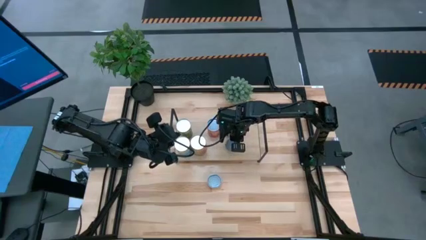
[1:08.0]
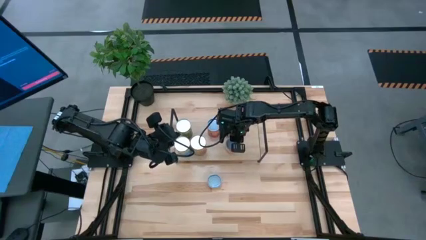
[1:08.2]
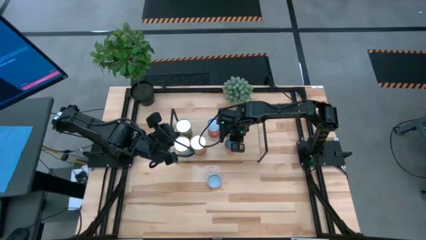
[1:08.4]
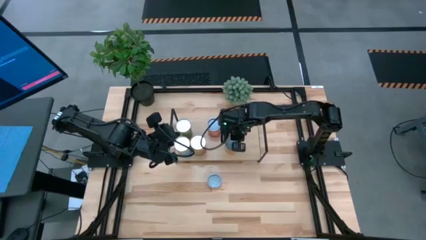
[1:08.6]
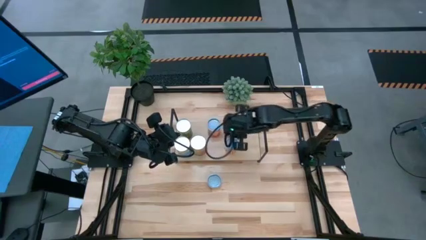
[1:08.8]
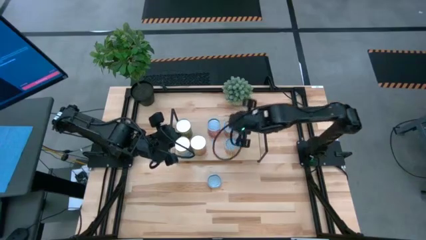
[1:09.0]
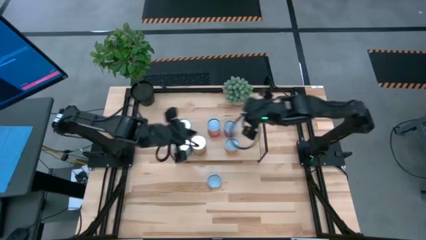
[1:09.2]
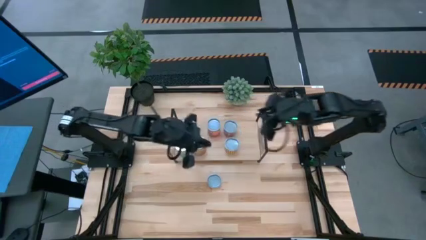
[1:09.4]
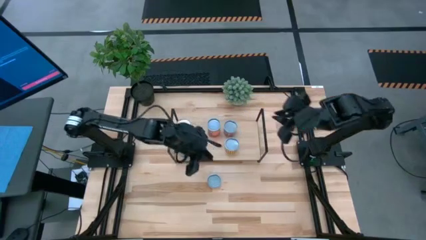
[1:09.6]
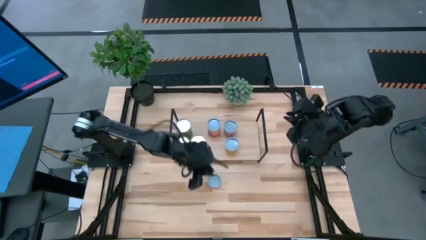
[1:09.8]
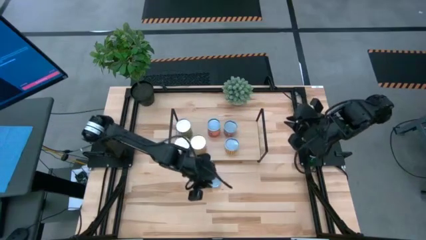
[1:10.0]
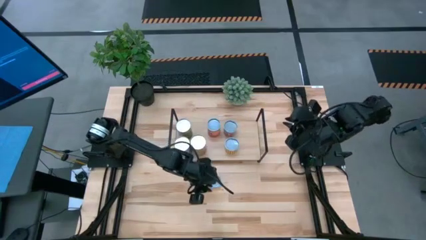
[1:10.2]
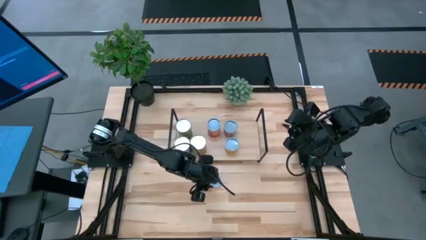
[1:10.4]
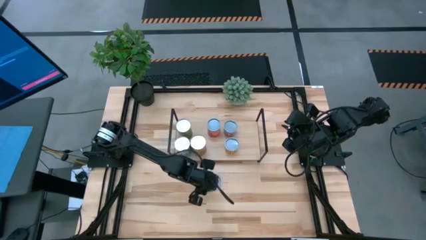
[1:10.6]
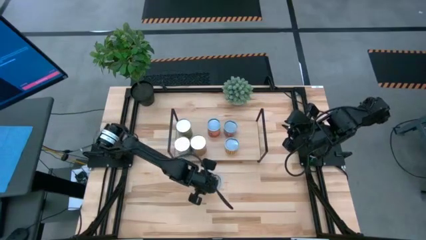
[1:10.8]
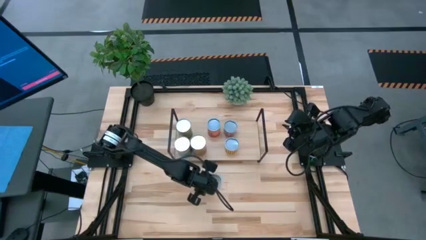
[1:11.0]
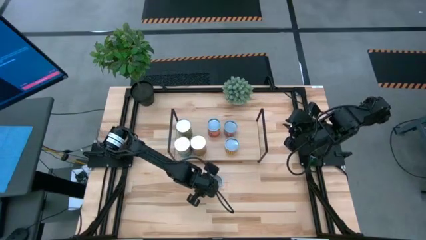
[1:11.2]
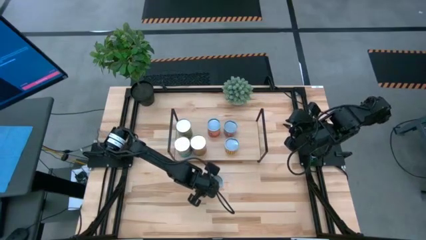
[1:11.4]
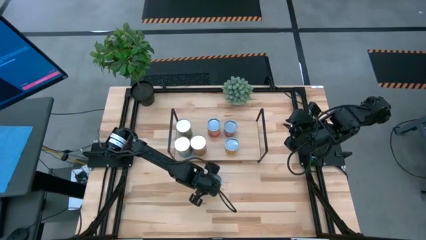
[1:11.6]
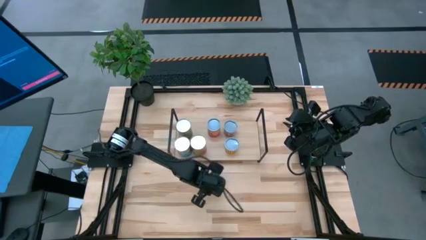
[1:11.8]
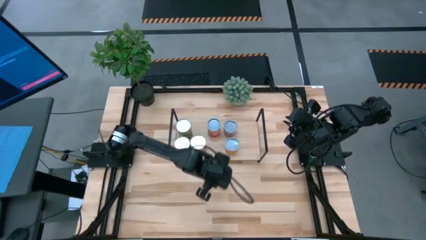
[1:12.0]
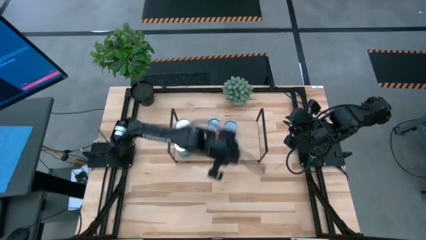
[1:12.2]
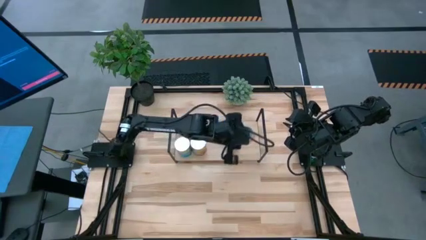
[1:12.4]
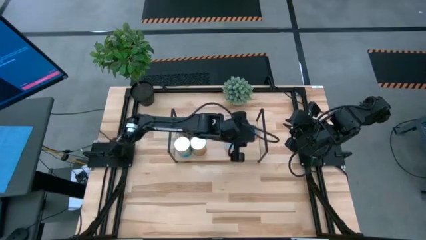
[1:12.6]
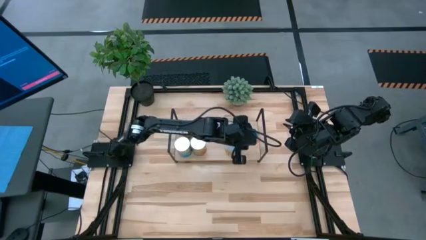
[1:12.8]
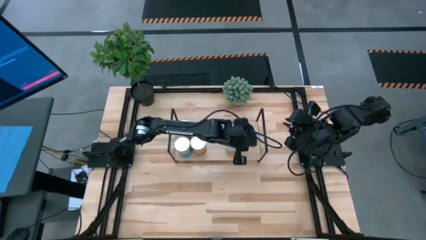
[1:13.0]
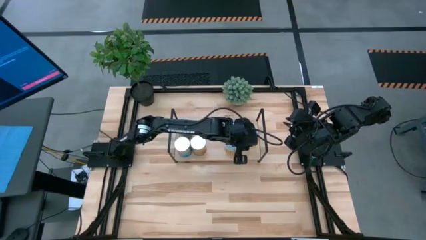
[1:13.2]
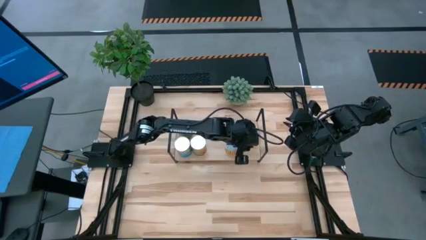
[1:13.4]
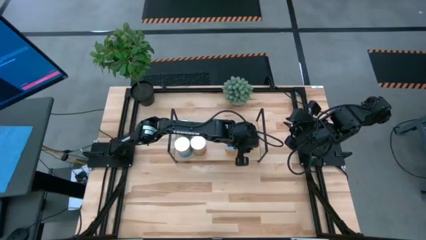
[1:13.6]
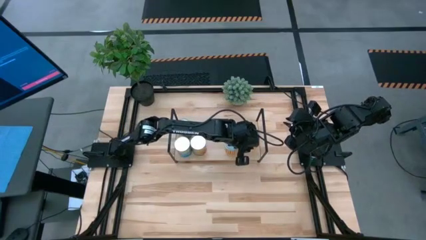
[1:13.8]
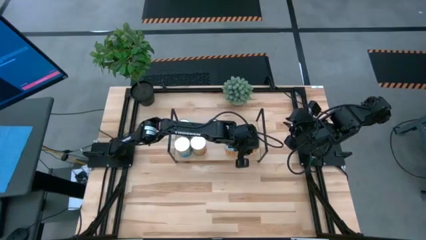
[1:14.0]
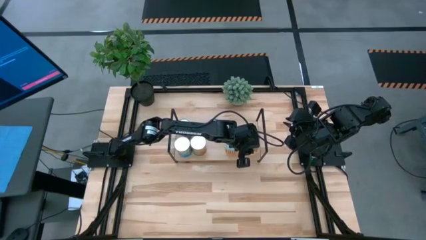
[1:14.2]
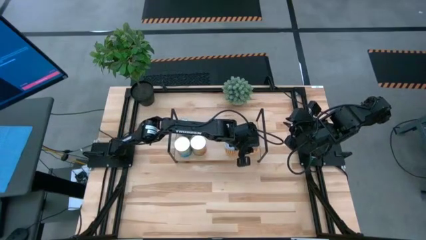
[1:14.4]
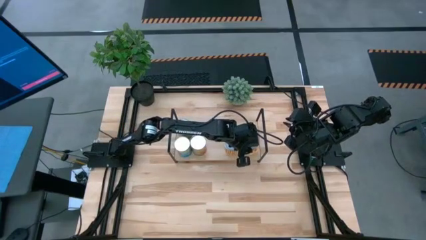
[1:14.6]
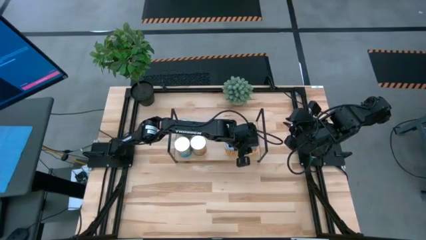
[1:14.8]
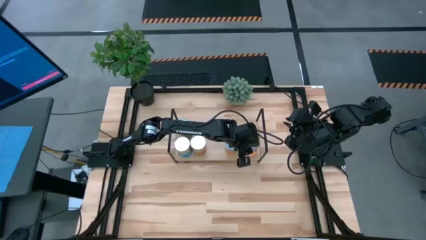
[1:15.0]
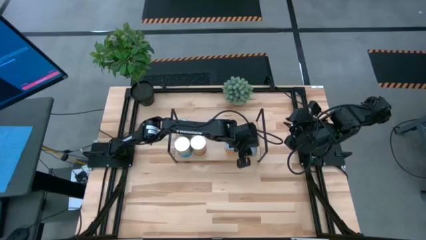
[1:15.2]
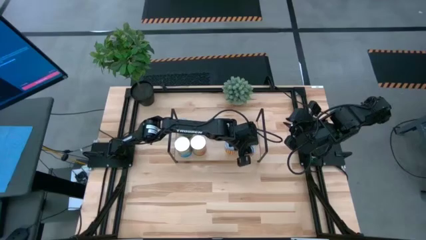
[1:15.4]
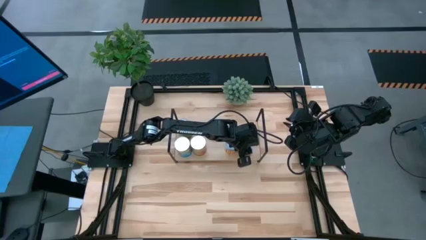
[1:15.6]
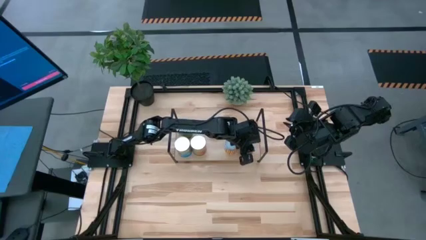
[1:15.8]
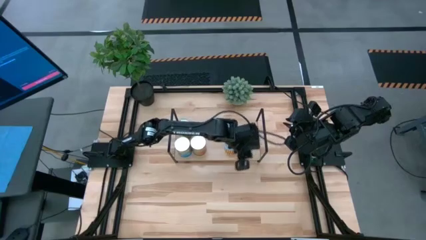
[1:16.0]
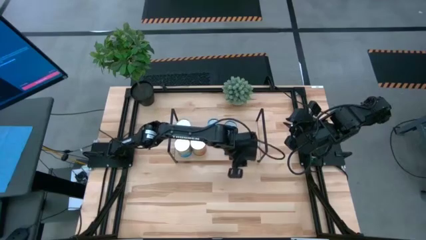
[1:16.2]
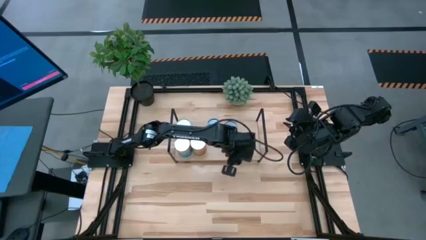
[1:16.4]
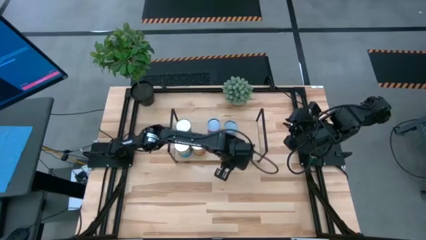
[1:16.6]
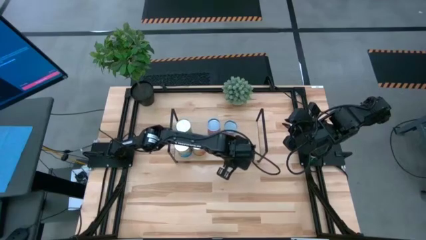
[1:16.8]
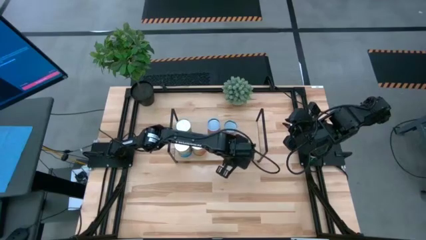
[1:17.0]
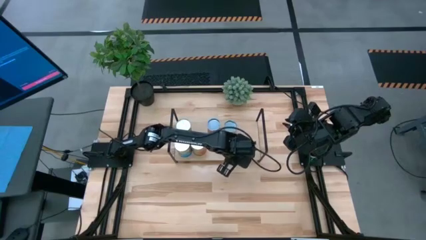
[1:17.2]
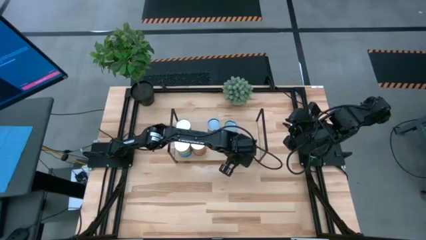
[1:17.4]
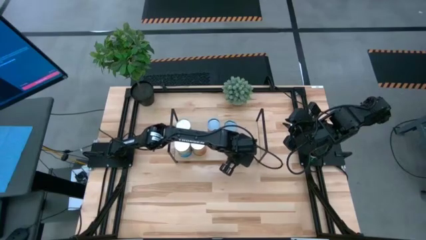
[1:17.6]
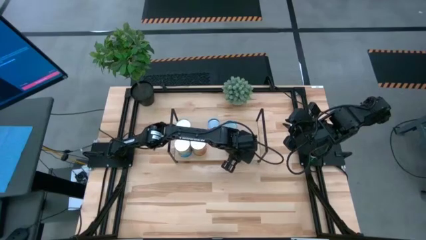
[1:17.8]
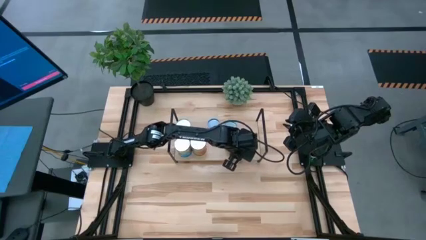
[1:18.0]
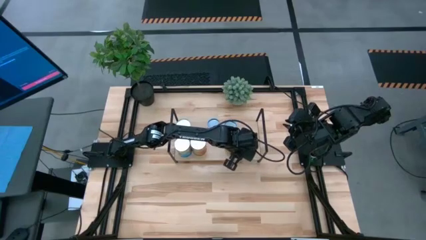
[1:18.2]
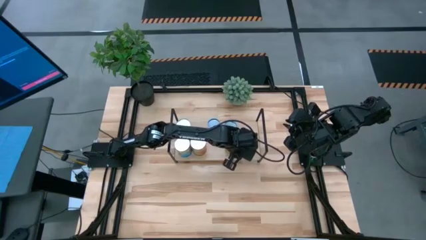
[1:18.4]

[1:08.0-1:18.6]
Task: Pick and place cans onto a shelf
Put the canned pineapples on the shelf
